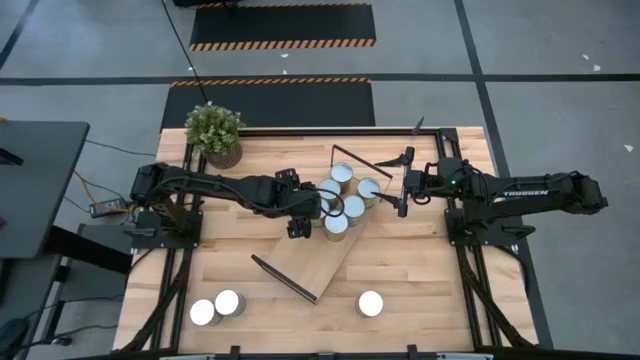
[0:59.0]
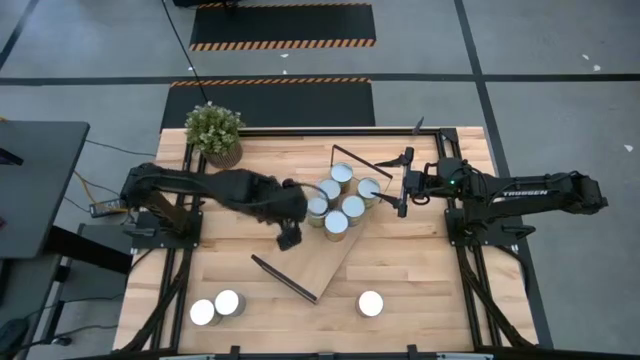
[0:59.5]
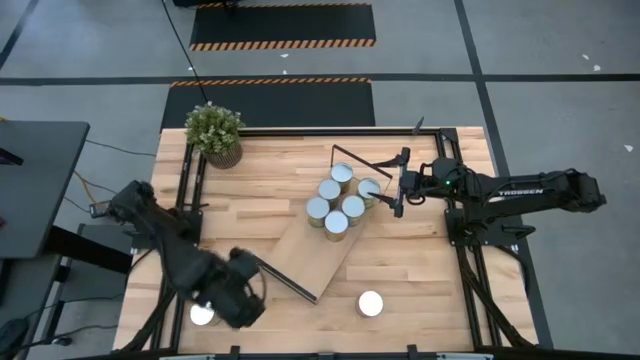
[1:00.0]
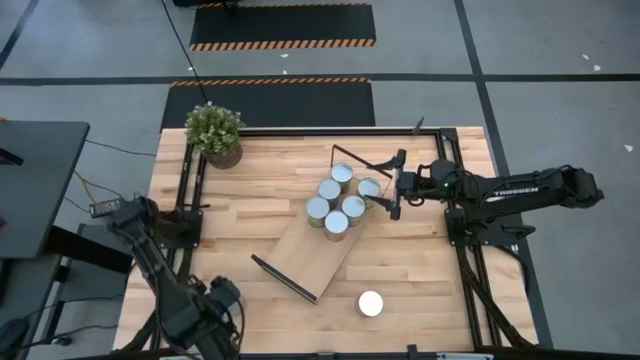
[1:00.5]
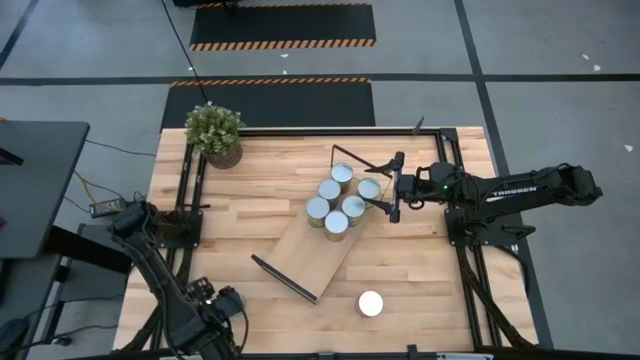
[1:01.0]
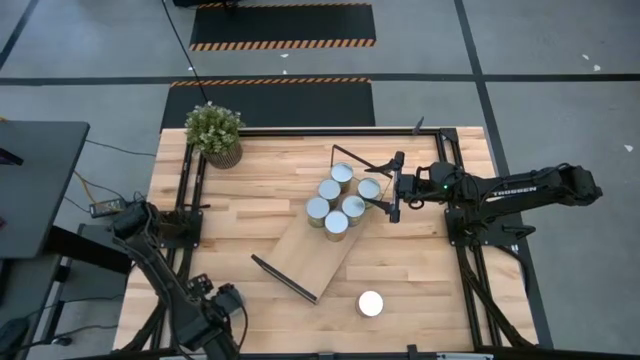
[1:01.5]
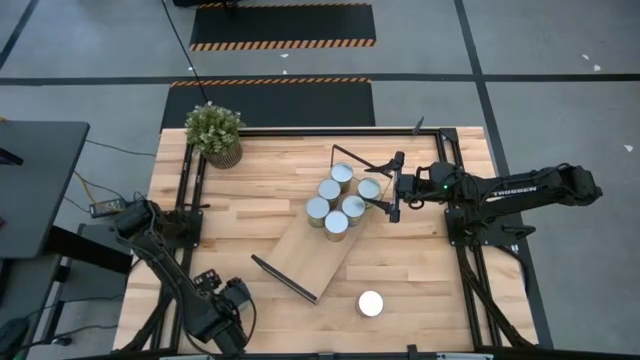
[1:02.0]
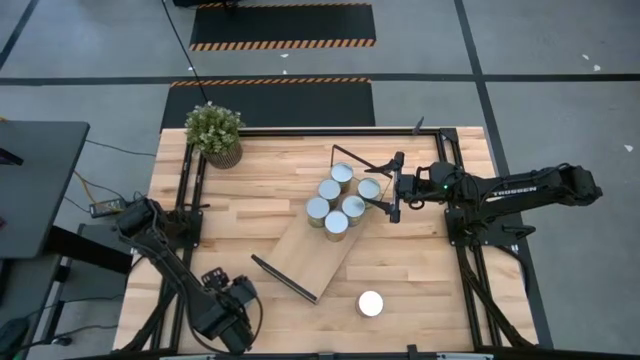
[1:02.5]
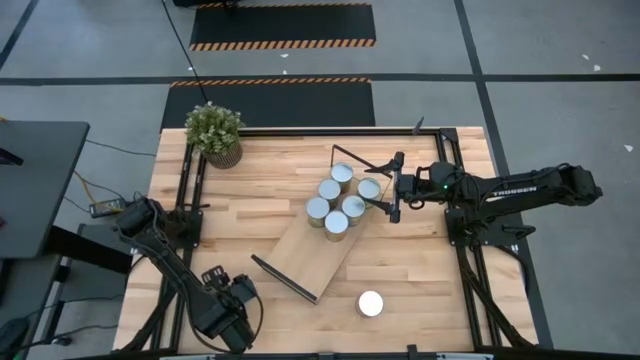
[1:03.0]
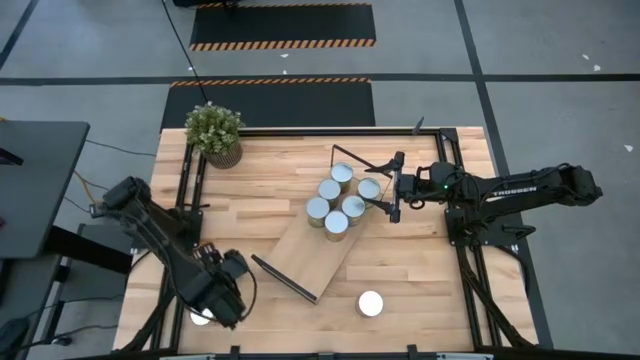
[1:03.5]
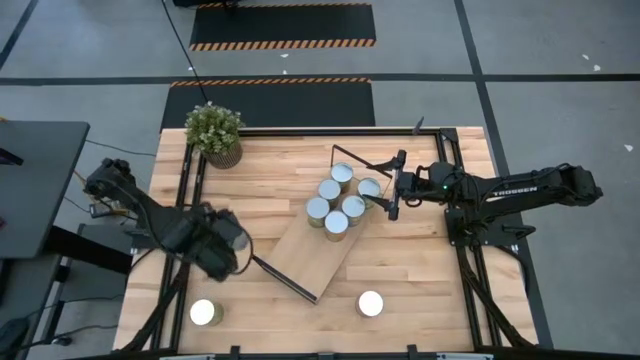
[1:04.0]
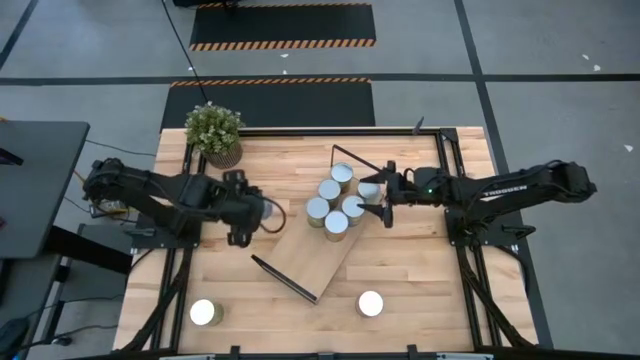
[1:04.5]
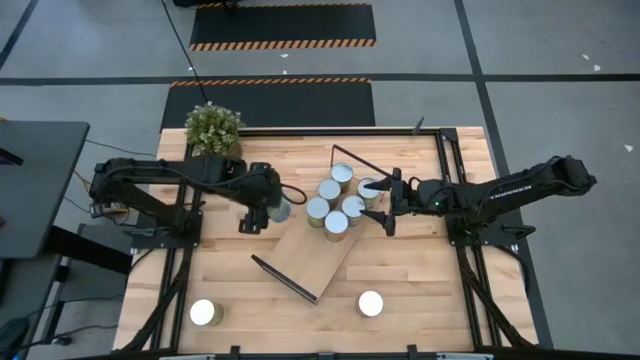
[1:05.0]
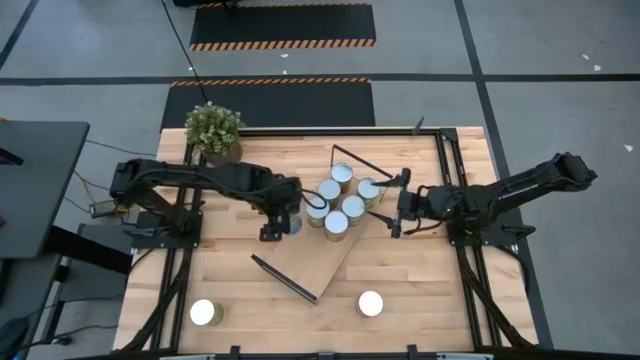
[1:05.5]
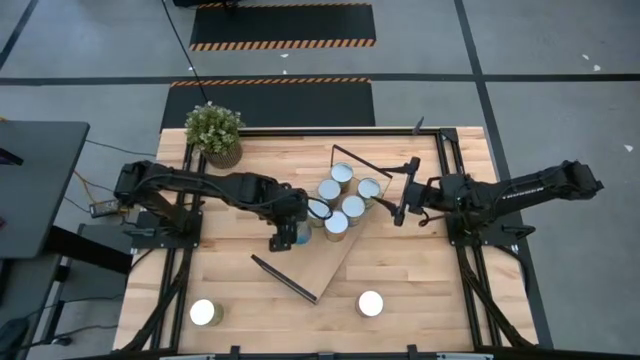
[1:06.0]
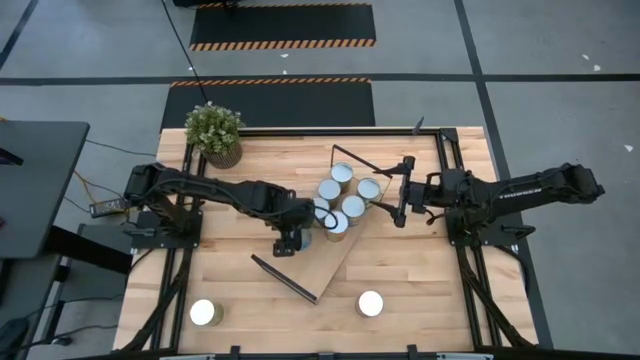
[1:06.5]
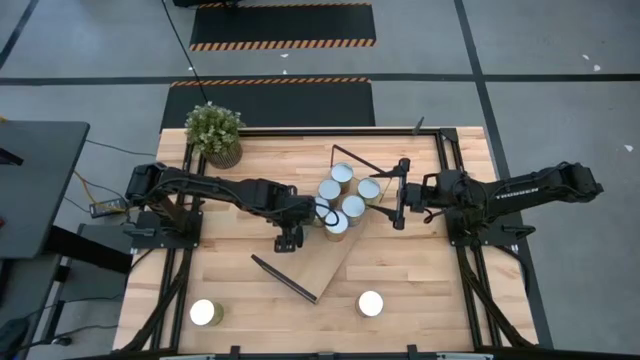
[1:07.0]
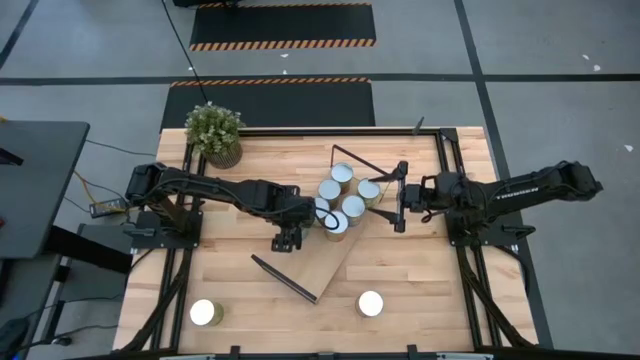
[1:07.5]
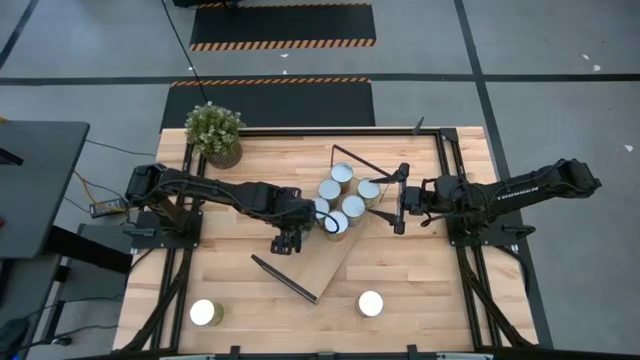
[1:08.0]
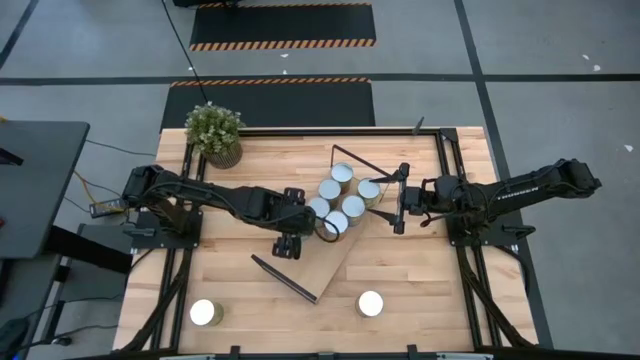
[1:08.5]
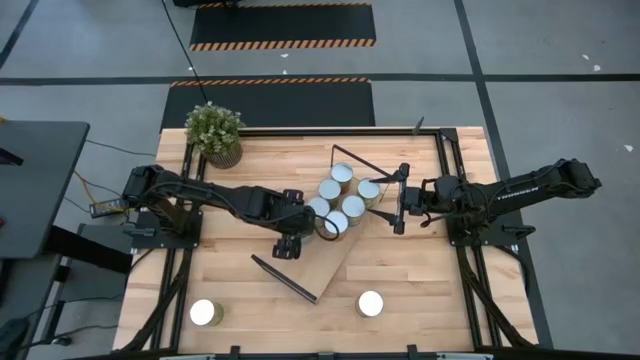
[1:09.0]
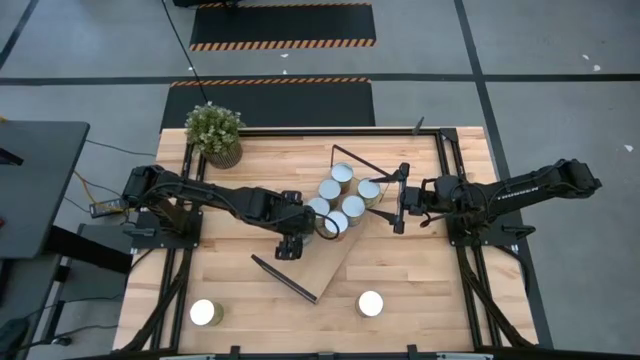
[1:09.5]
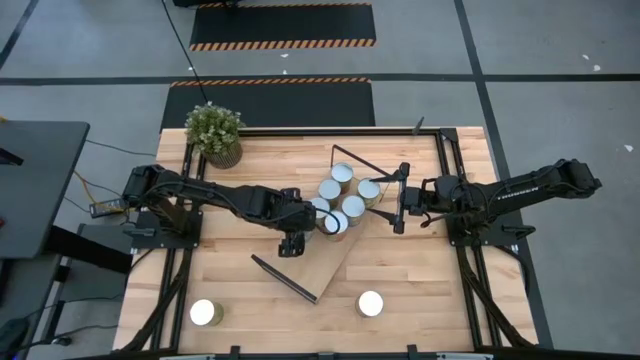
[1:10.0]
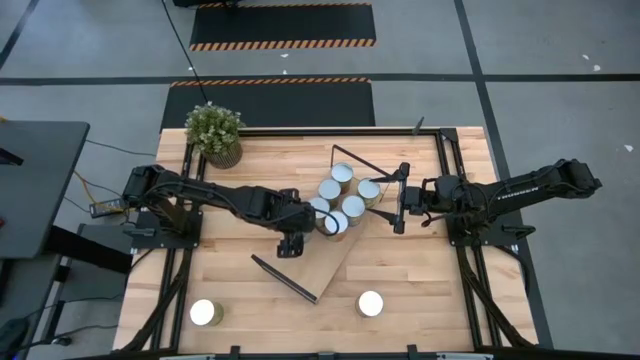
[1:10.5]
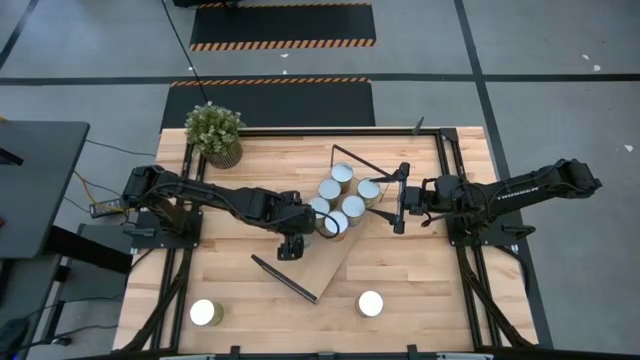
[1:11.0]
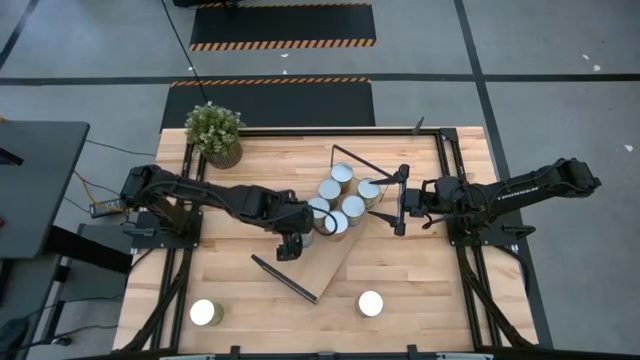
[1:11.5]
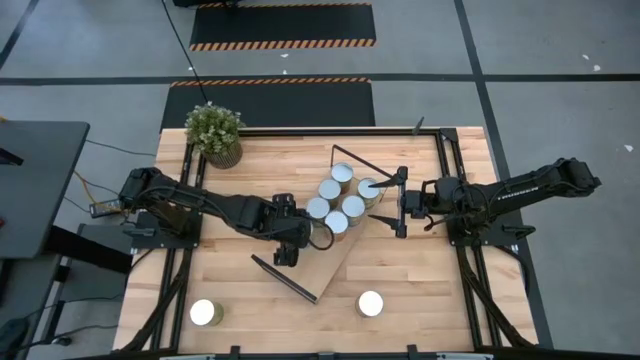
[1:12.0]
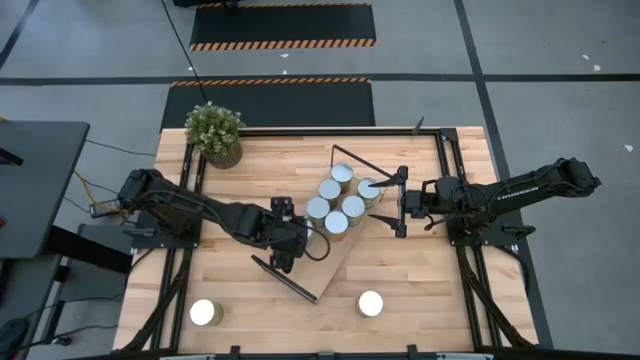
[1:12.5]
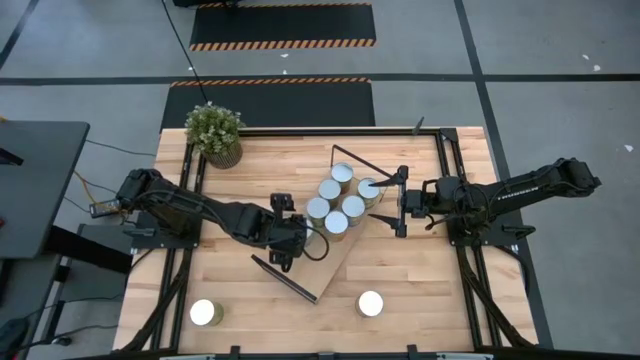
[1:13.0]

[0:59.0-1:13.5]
Task: Pick and place cans onto a shelf
Put the canned cherries on the shelf

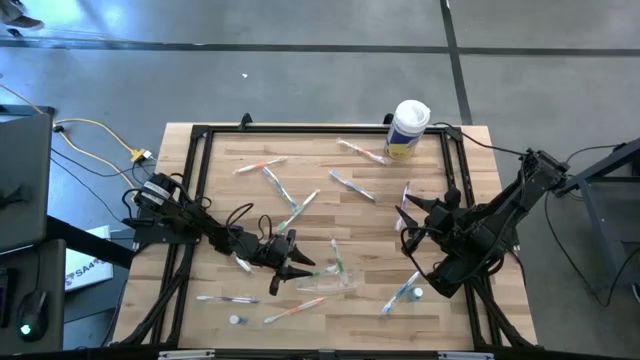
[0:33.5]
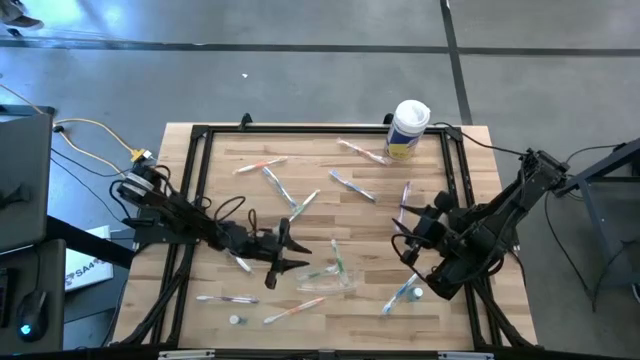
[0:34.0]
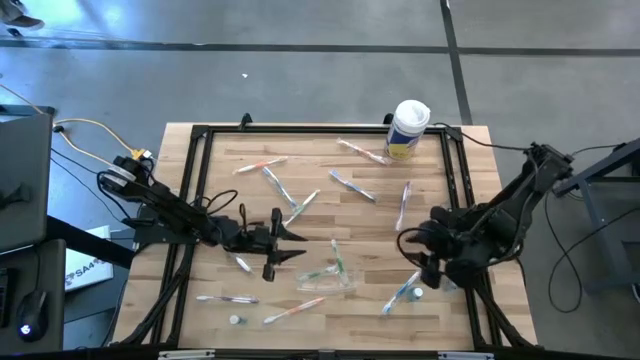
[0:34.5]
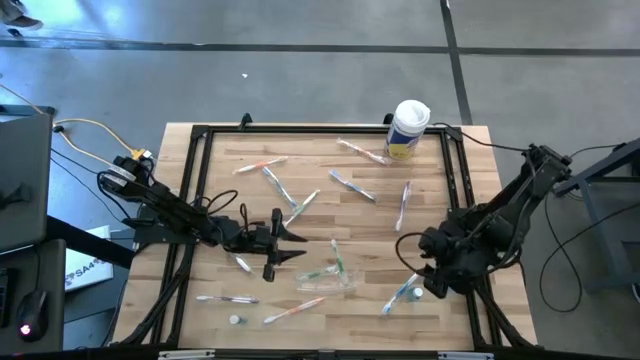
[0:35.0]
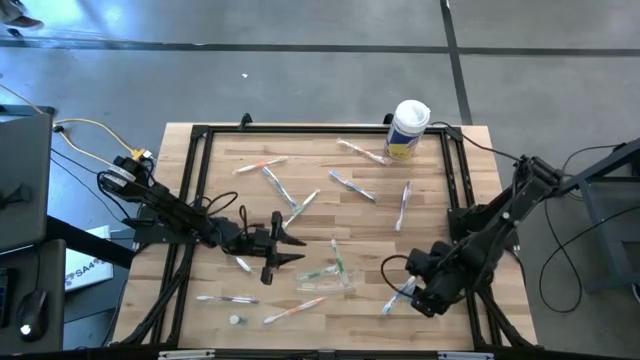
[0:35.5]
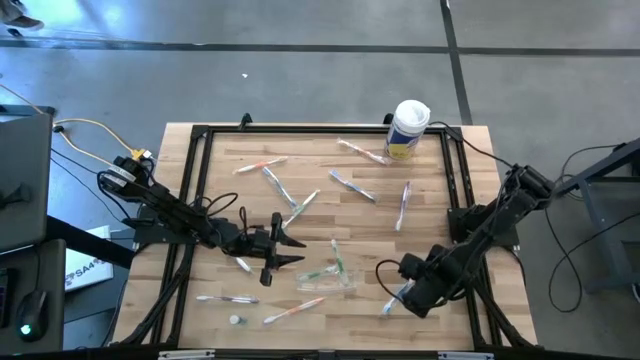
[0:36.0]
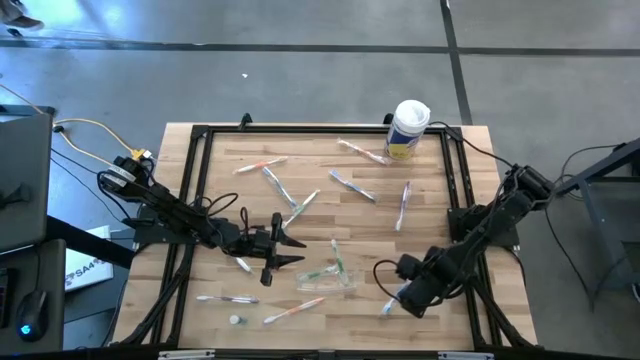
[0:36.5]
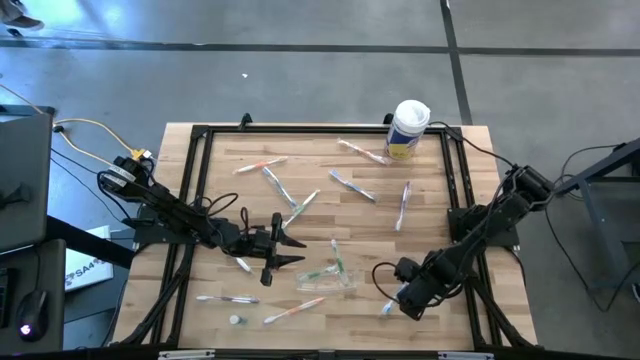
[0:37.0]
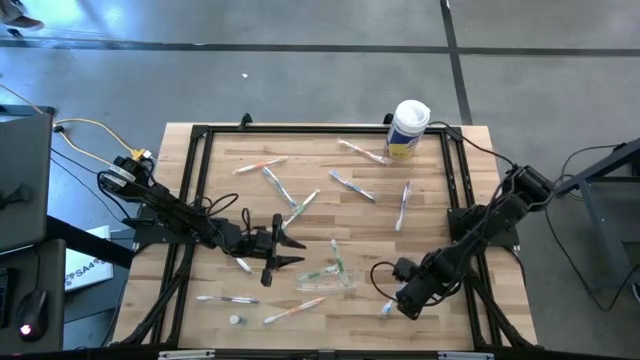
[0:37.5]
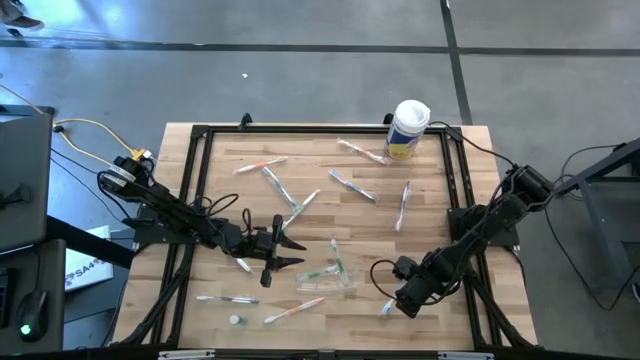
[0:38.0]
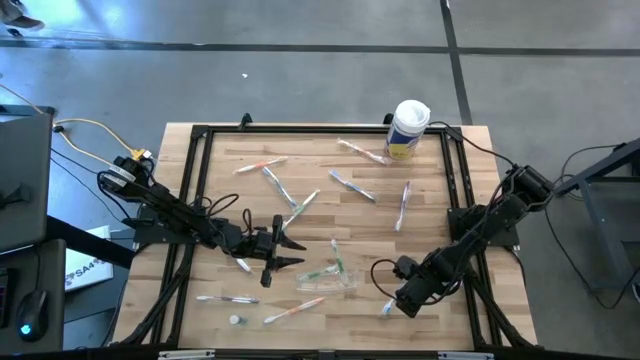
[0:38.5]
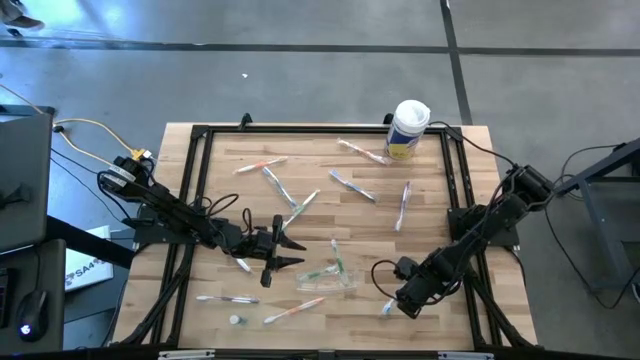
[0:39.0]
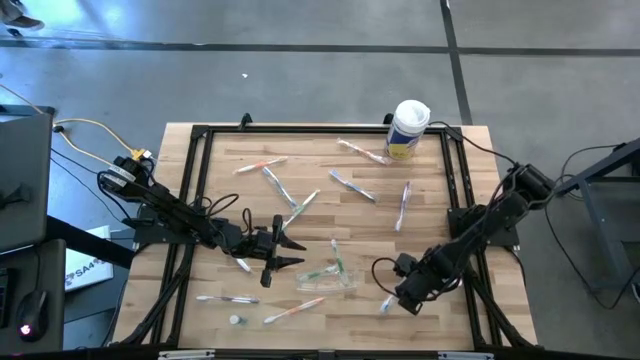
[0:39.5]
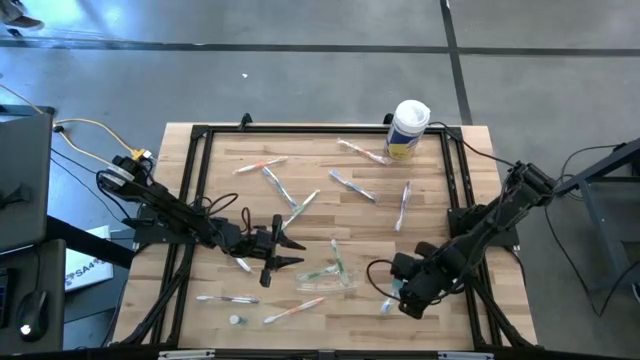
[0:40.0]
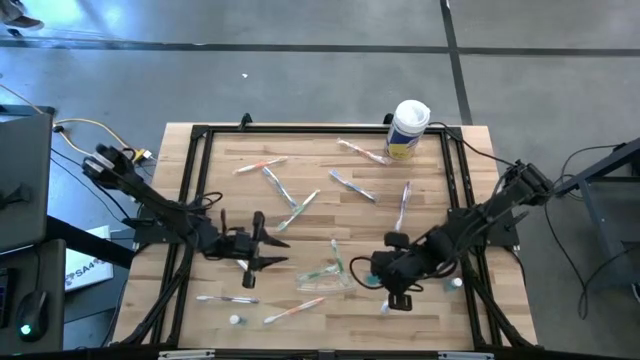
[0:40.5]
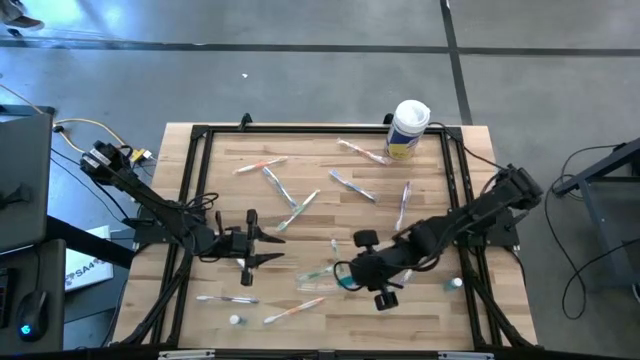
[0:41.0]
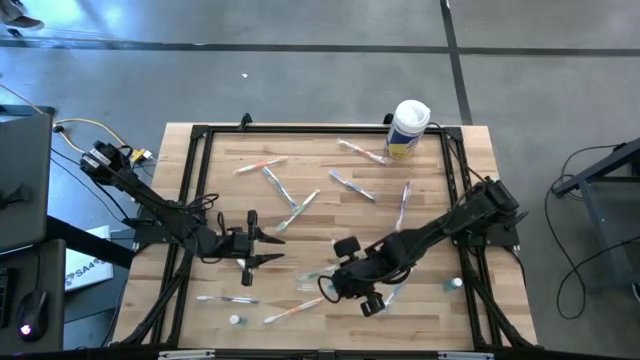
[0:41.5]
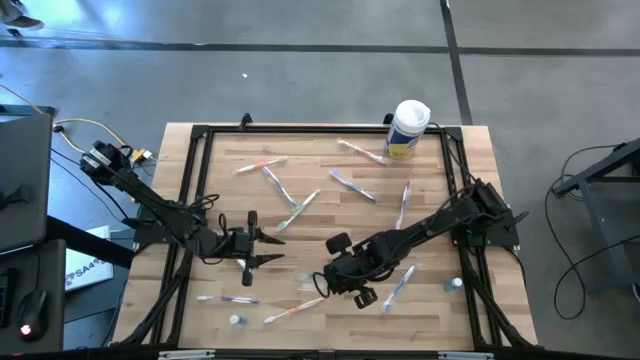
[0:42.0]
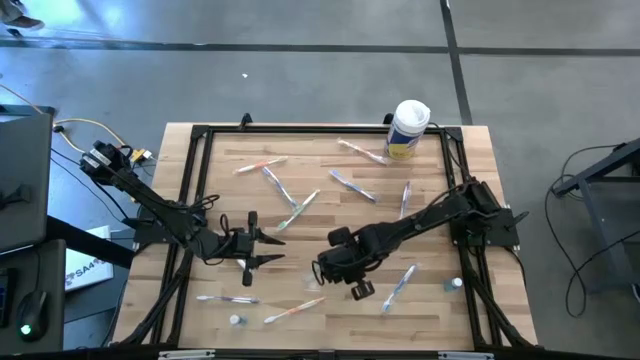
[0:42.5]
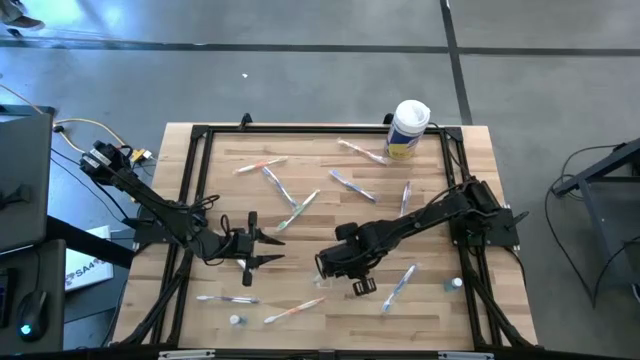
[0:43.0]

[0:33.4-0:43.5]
Task: Pick & Place toothbrushing station
Put the middle blue mouthwash into the transparent organizer
